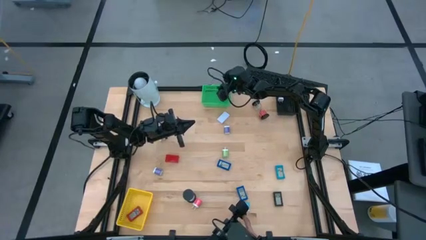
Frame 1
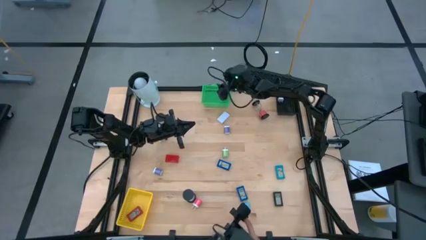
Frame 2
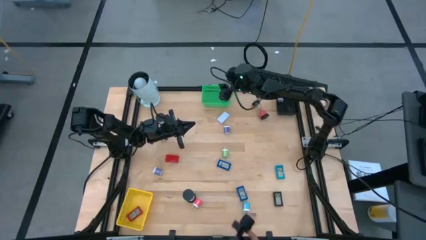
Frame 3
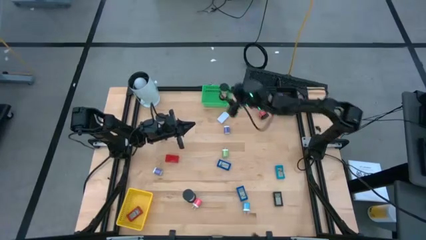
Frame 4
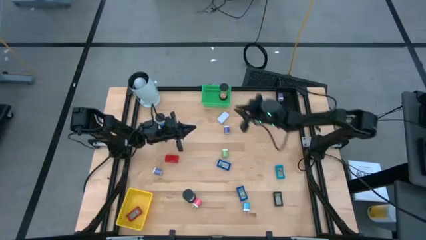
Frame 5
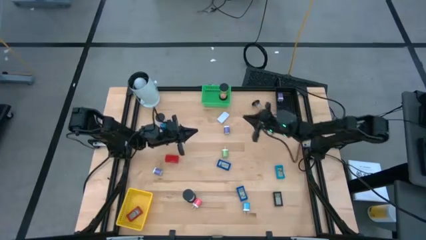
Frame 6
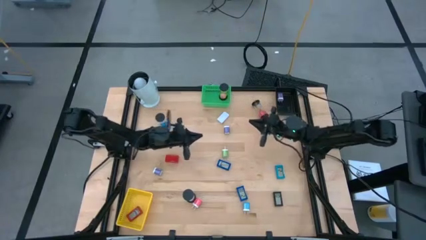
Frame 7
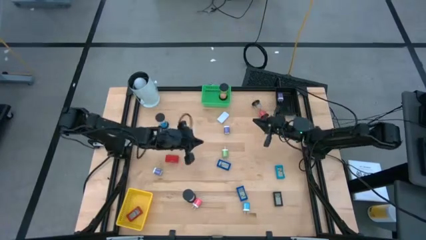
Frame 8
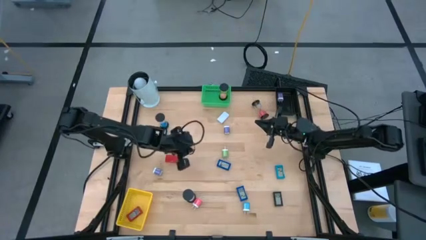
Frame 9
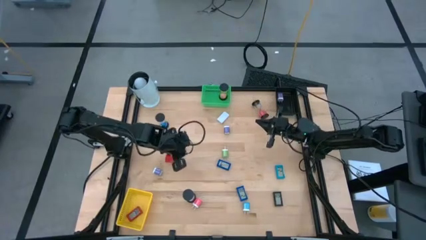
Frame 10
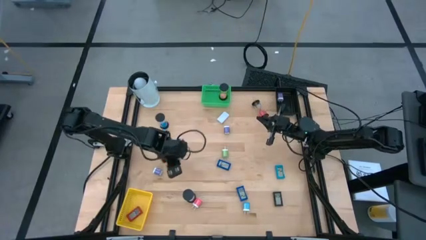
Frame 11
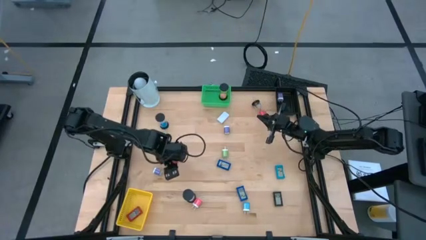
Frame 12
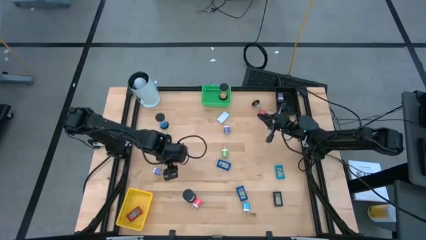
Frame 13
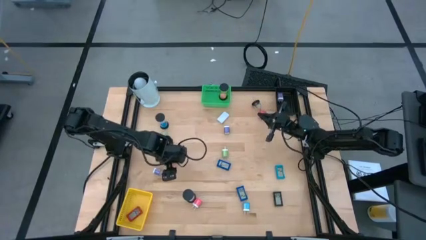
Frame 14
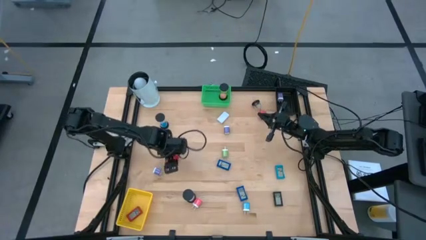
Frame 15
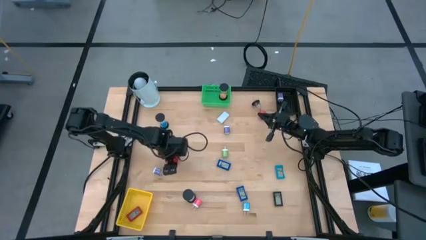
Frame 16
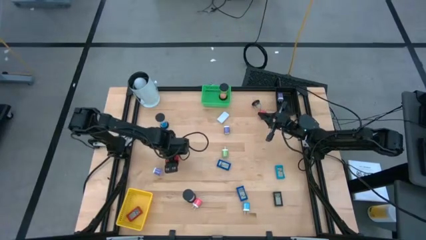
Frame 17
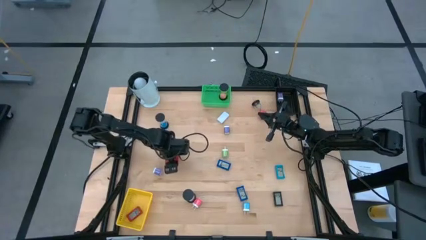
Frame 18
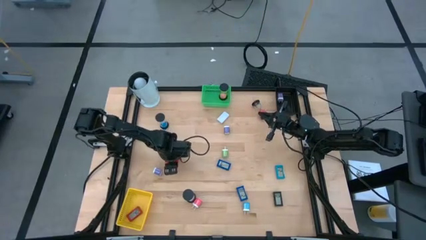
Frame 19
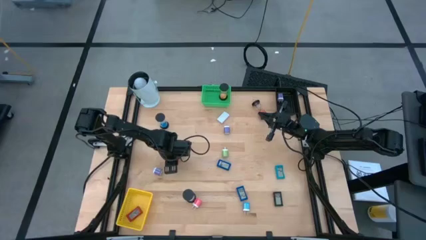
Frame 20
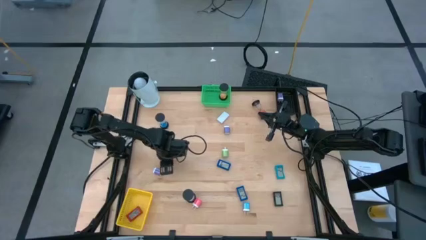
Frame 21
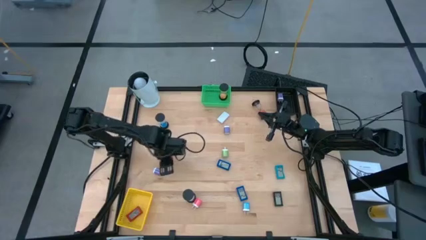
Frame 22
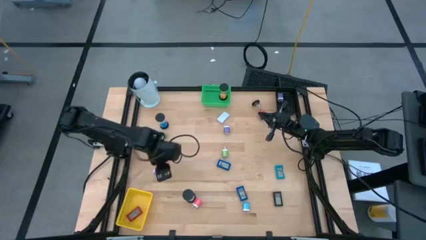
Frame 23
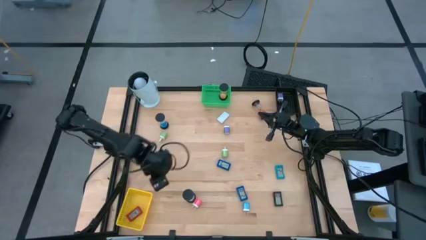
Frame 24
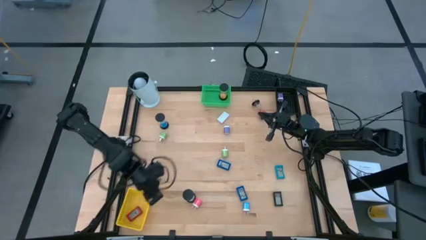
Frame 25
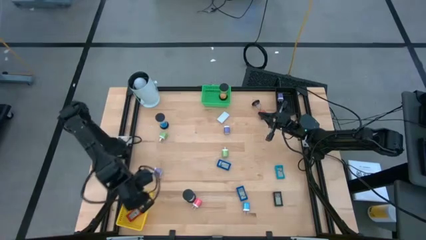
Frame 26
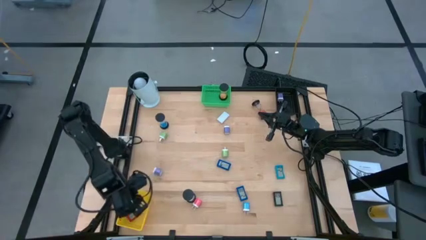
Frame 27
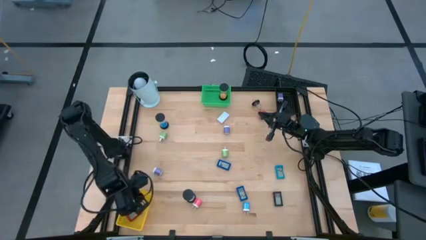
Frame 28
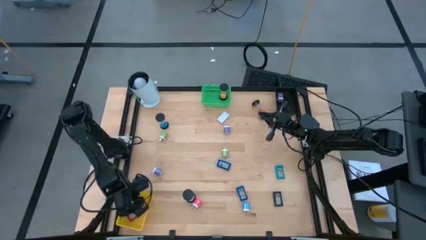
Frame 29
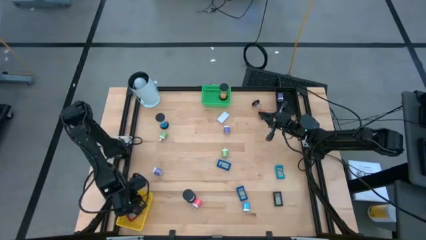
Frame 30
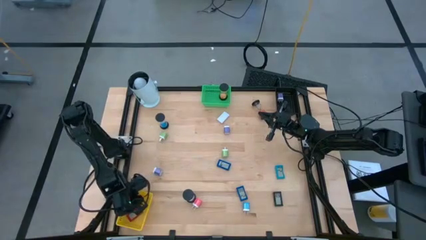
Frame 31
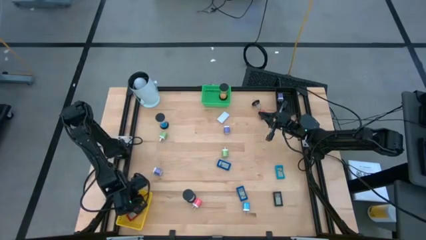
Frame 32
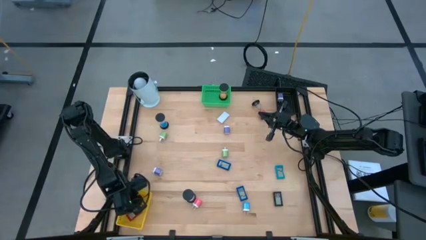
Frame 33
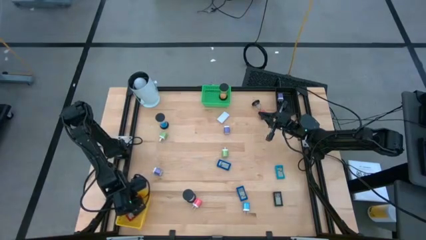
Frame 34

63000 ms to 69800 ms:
Task: Pick & Place Office items
Put the red timer into the yellow basket

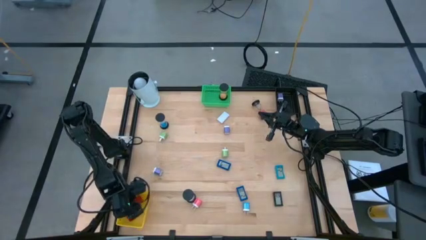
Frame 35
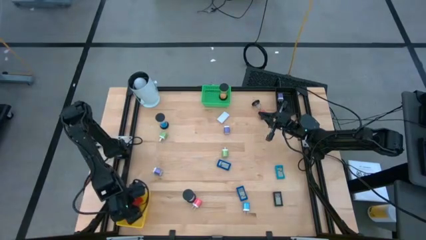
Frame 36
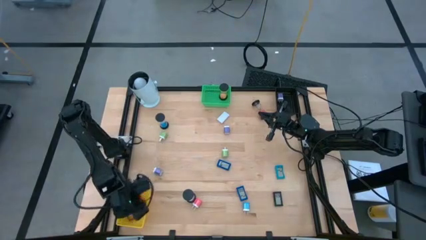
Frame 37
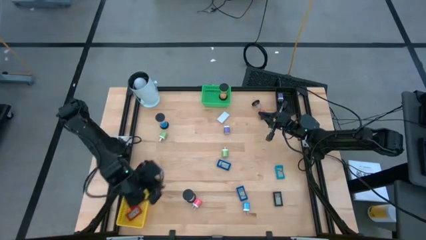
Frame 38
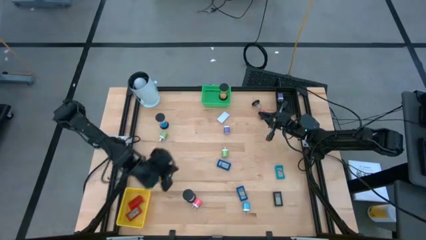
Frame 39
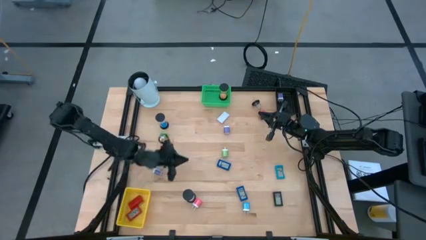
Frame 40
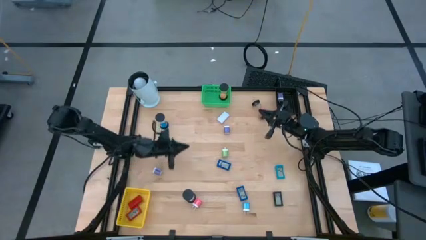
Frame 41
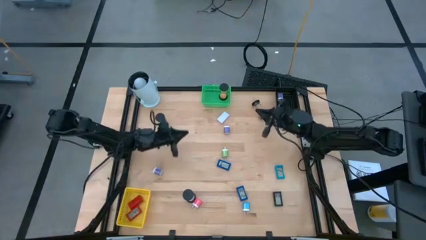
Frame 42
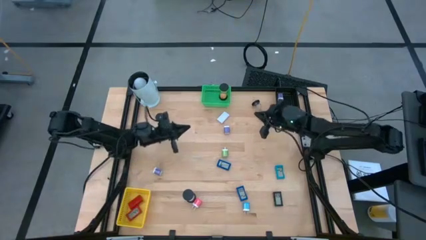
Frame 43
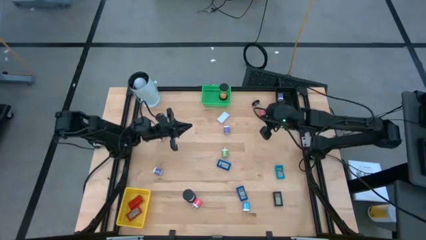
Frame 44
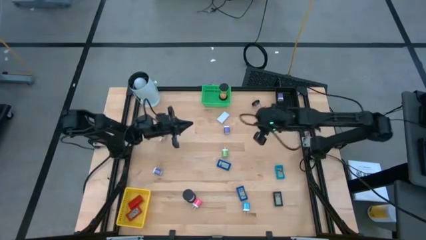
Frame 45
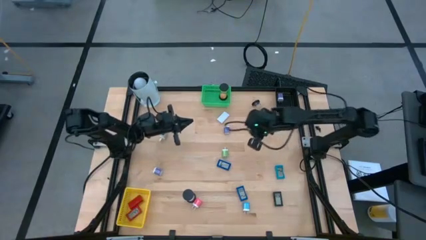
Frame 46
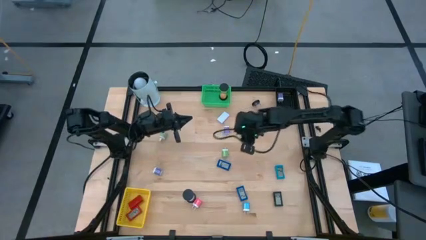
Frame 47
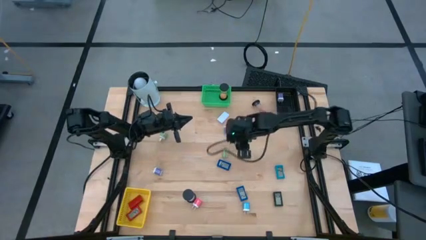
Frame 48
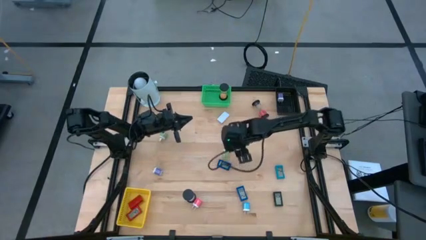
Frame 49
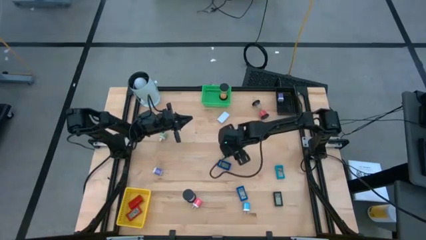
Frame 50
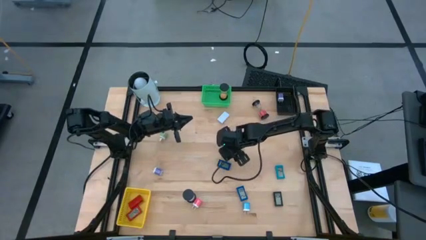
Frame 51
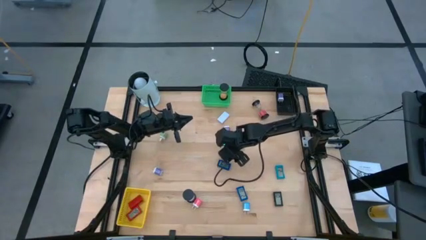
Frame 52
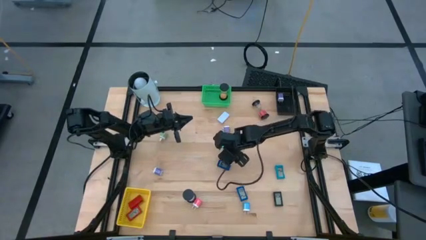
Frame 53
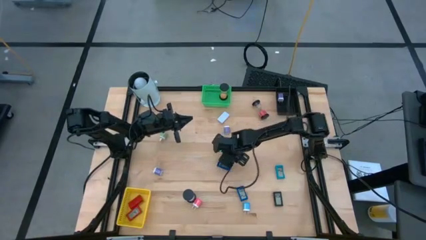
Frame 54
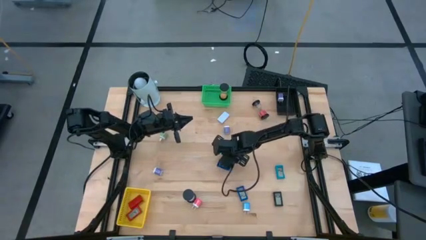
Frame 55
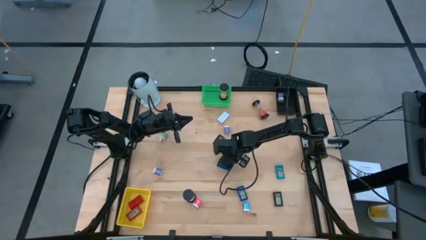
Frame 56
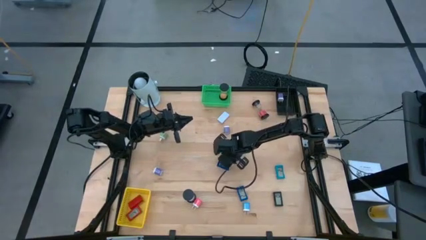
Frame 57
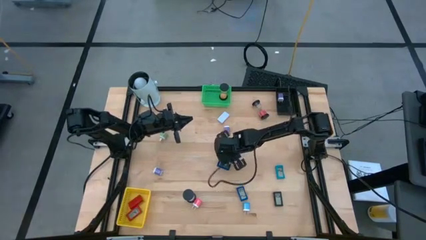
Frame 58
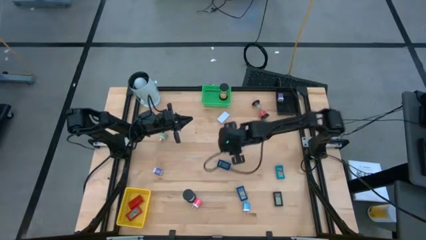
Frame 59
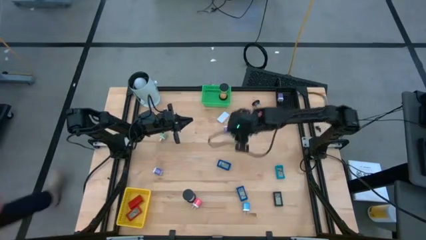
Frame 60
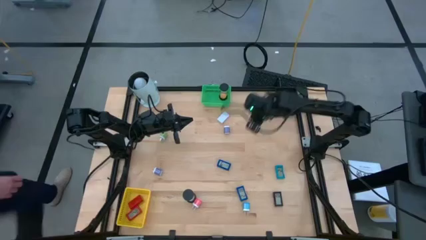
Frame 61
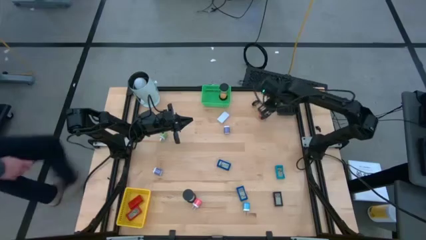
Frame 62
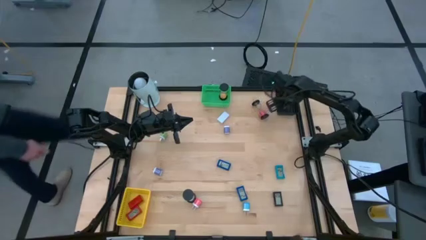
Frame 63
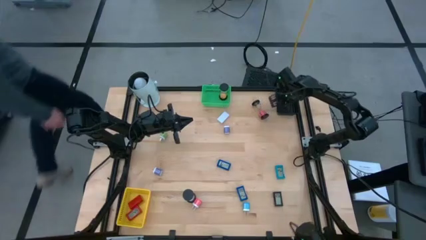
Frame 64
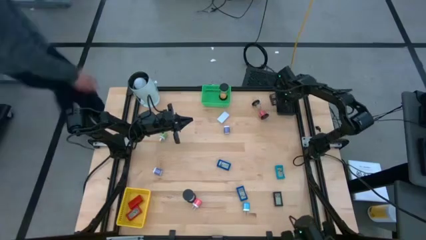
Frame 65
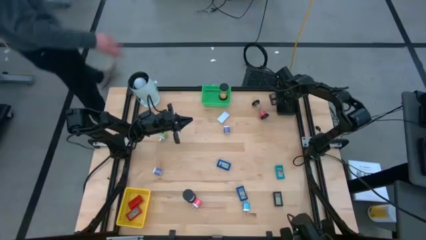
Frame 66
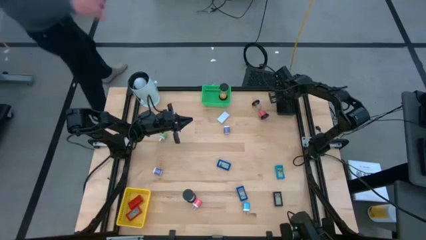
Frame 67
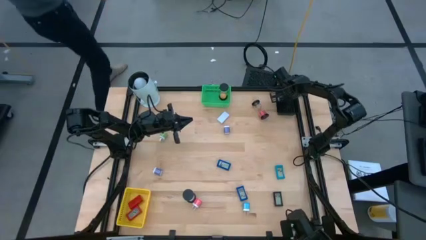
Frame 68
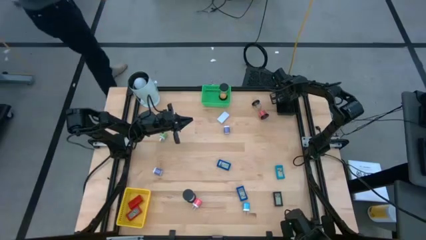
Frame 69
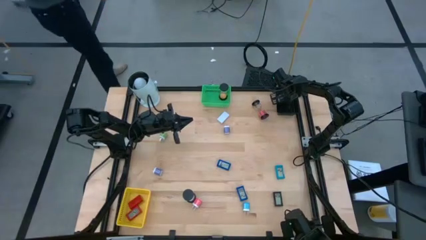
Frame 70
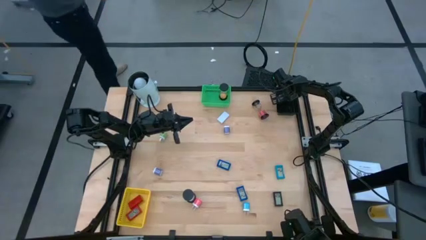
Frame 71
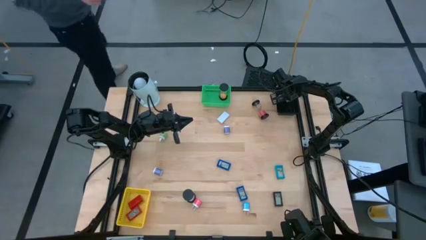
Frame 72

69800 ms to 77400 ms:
Put the right green adapter into the black basket
